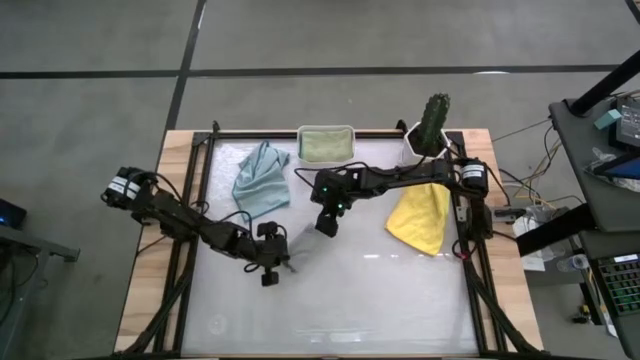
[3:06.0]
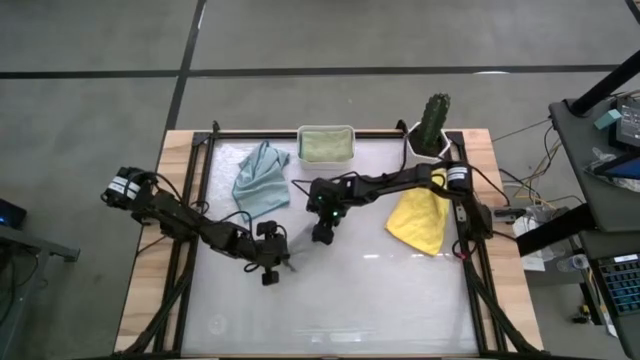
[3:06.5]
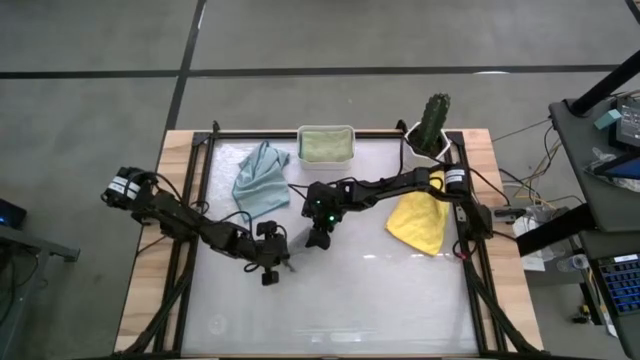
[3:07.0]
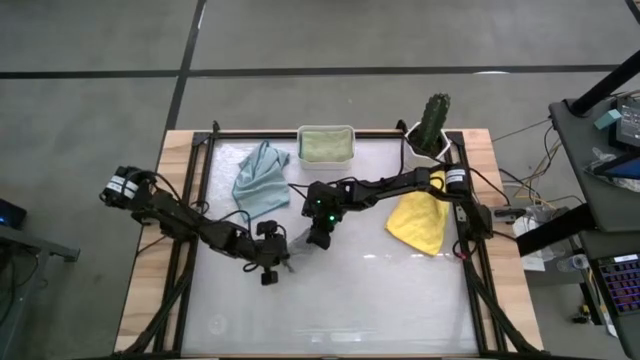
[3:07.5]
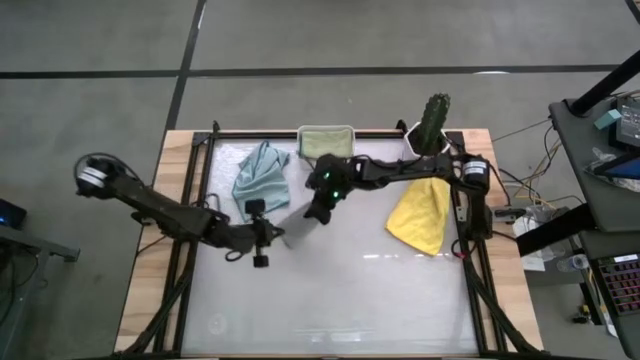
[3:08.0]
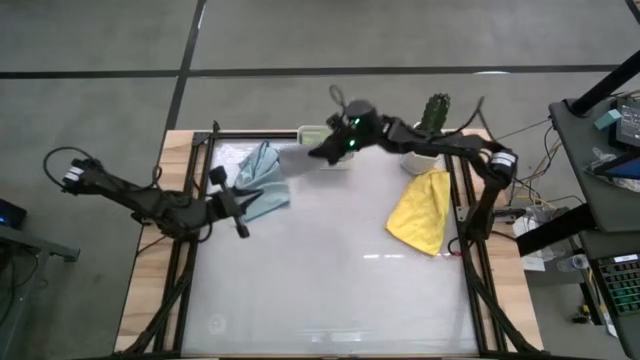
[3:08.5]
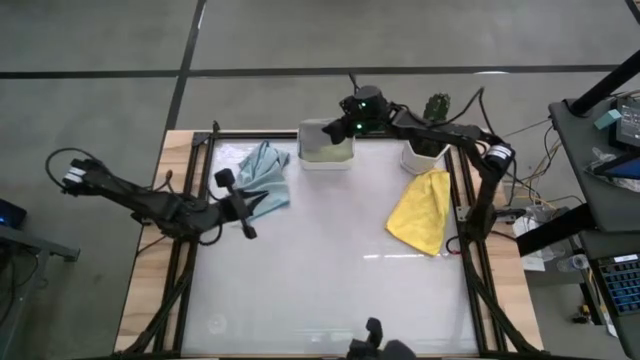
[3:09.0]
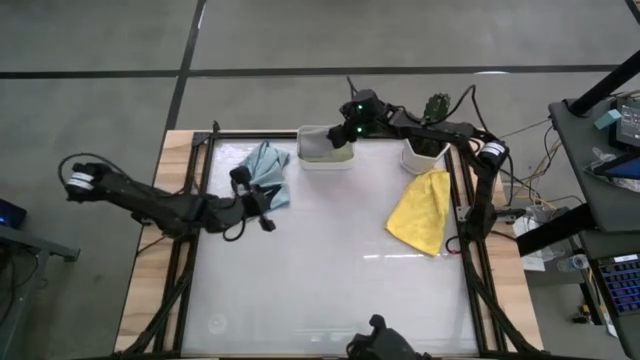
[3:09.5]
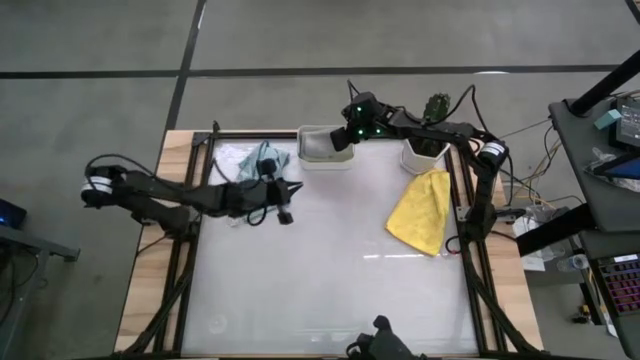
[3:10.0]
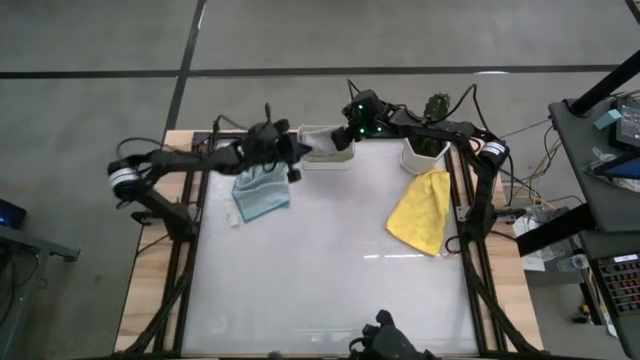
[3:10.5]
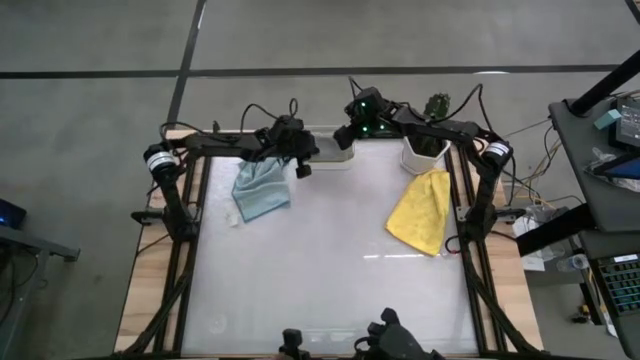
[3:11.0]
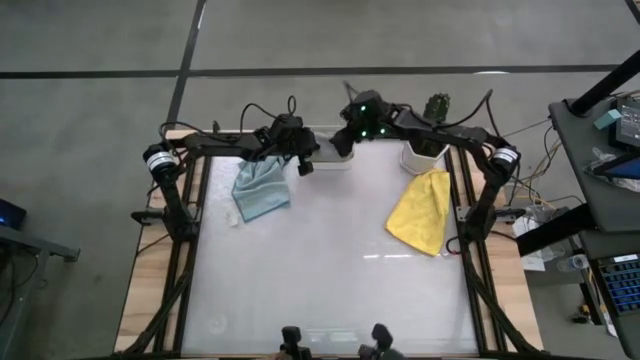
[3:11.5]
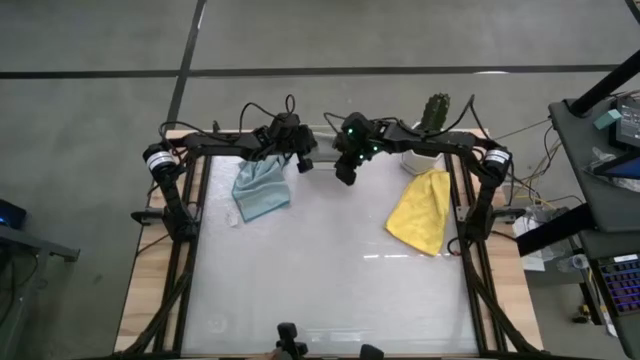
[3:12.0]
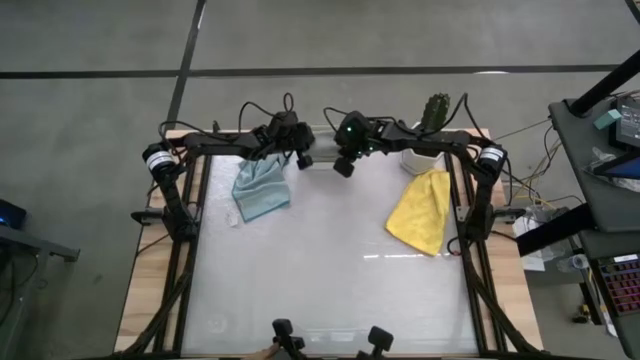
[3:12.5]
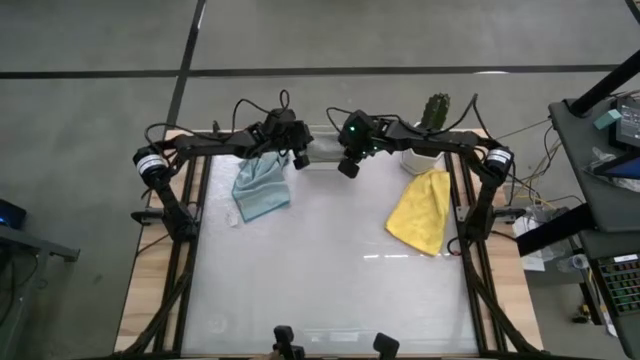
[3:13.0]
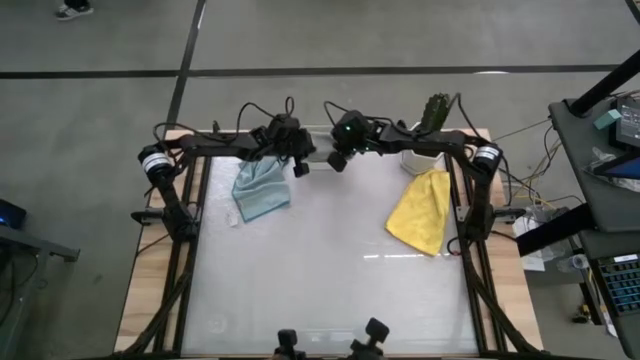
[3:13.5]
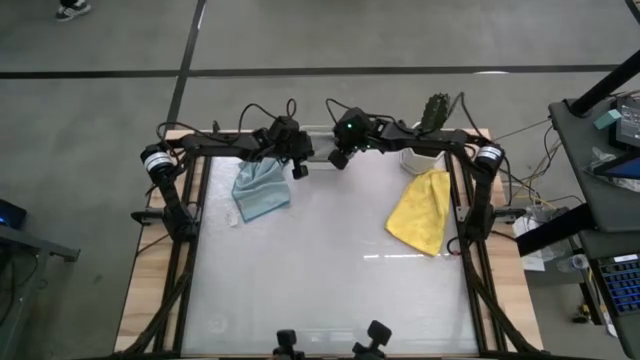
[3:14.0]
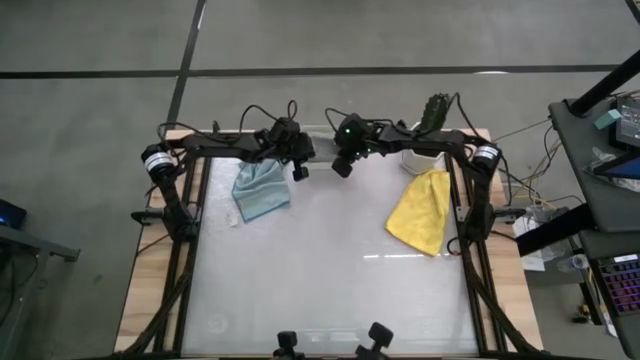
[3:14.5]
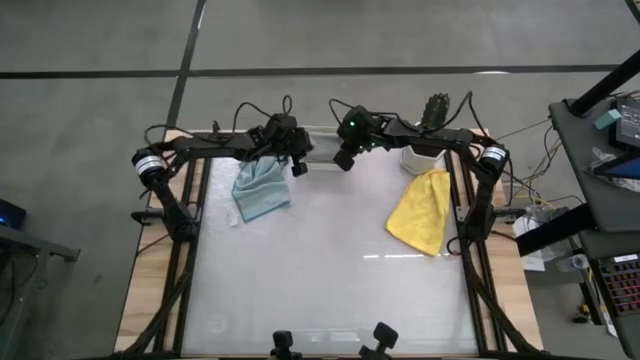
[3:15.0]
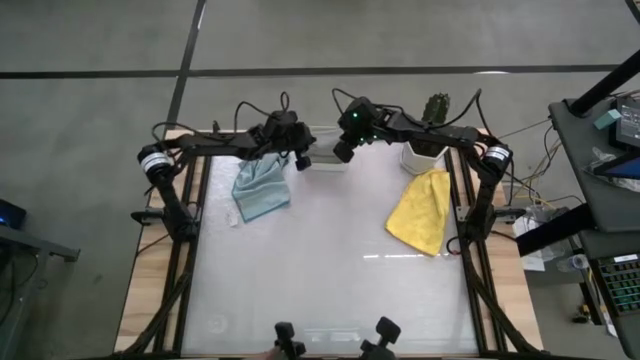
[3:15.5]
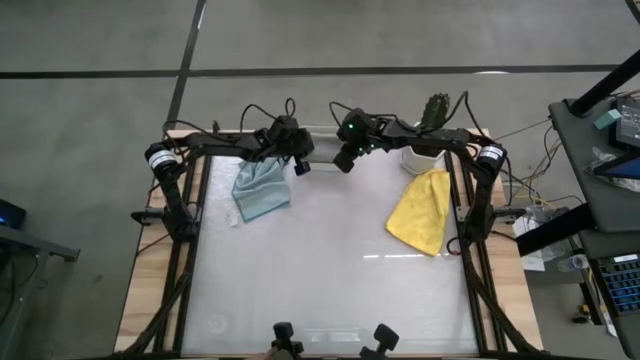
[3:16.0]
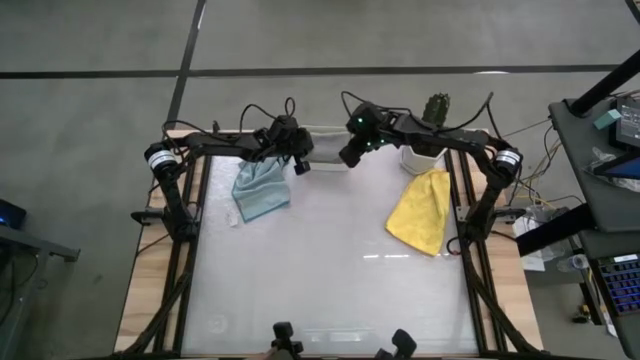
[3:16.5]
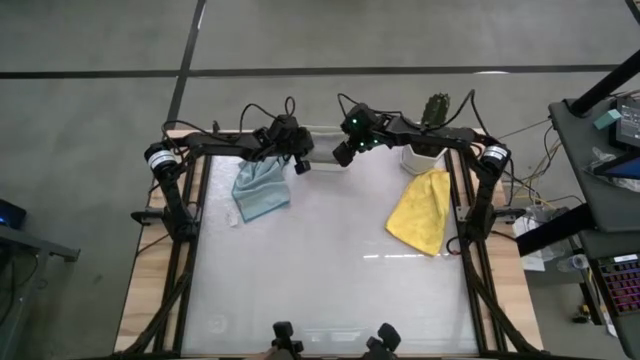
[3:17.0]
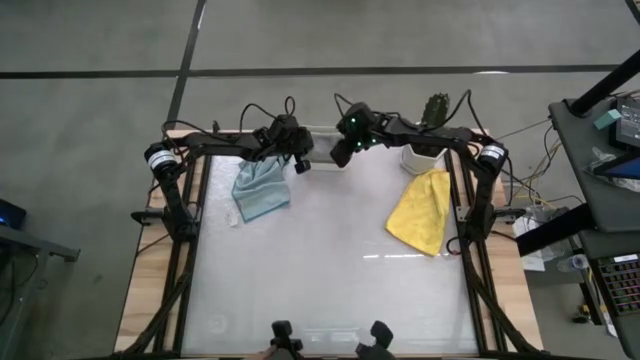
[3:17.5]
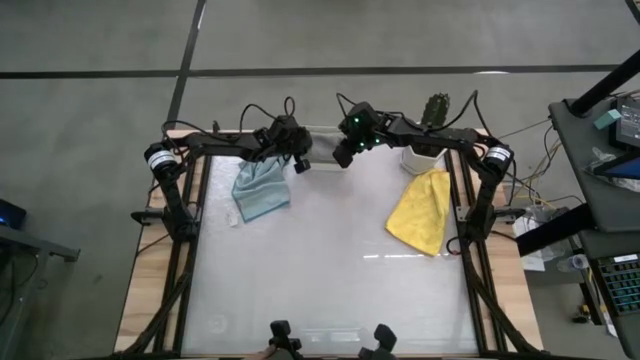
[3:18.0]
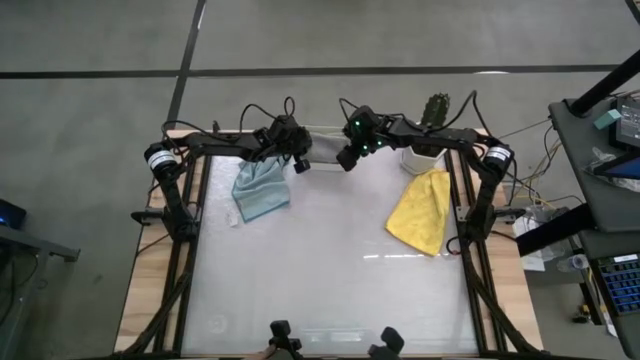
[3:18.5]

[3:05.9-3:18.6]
Task: Fold microfiber towels
Put the gray cloth into the bin
